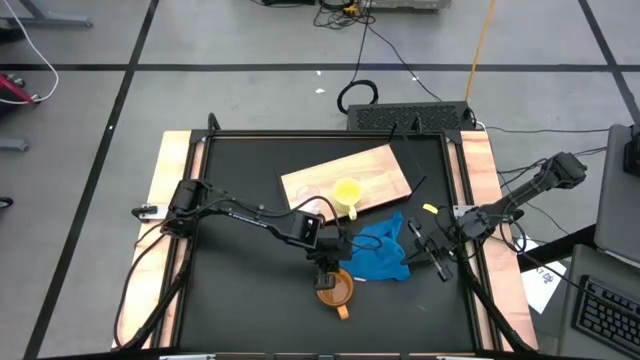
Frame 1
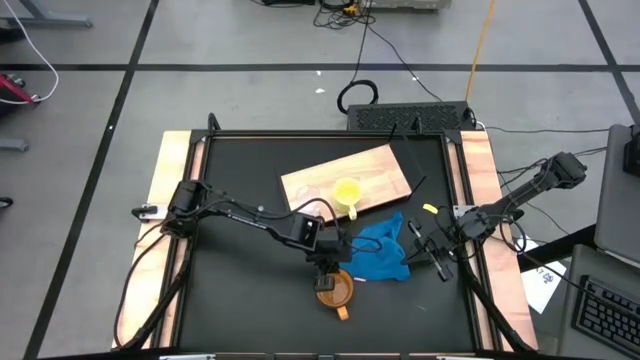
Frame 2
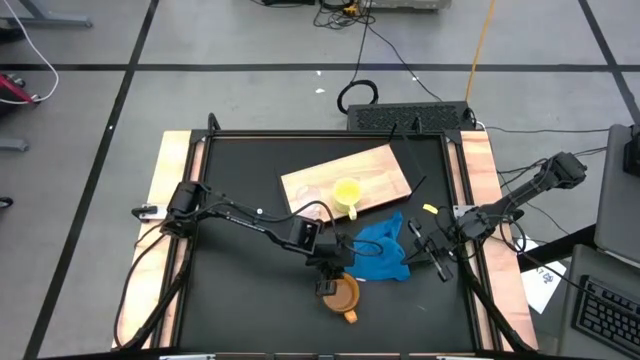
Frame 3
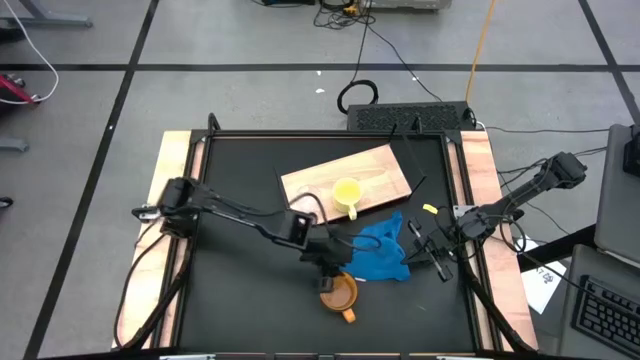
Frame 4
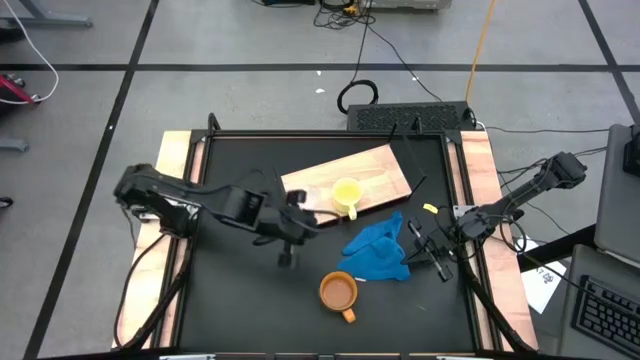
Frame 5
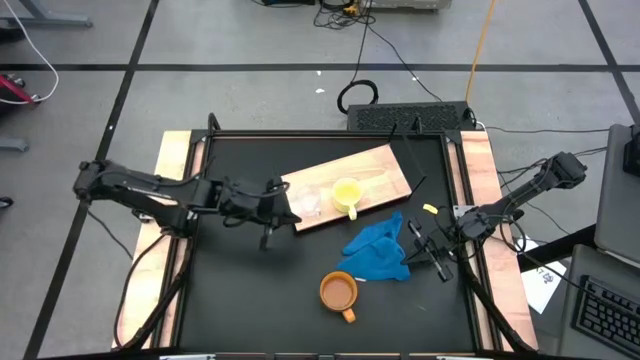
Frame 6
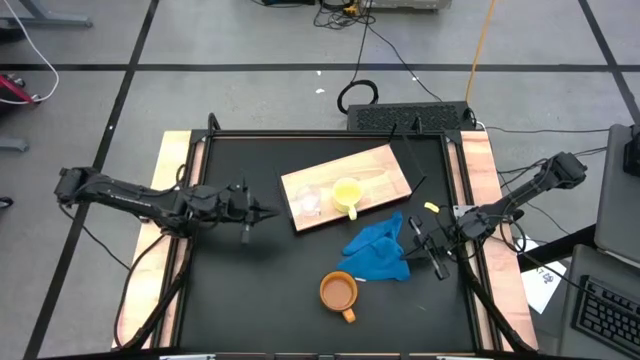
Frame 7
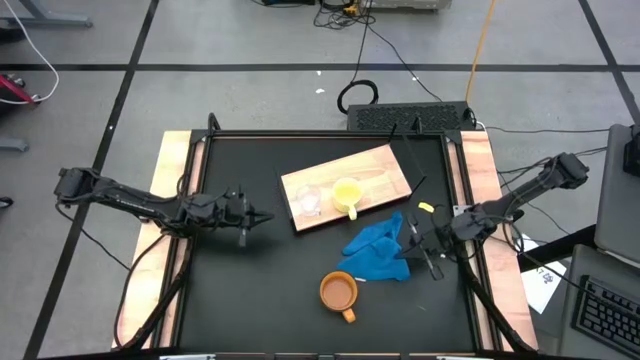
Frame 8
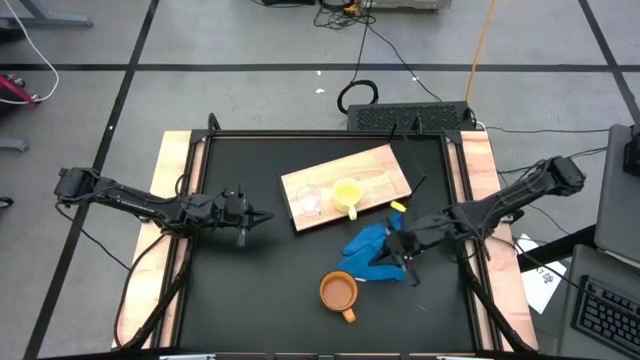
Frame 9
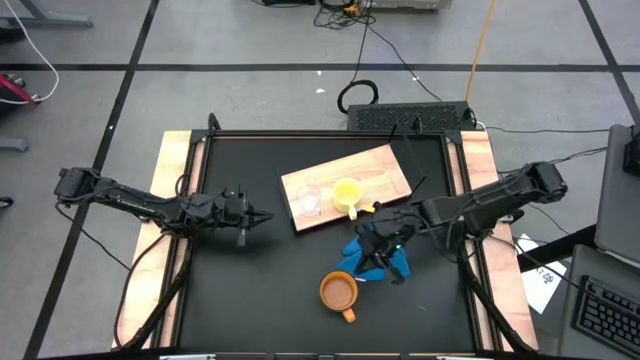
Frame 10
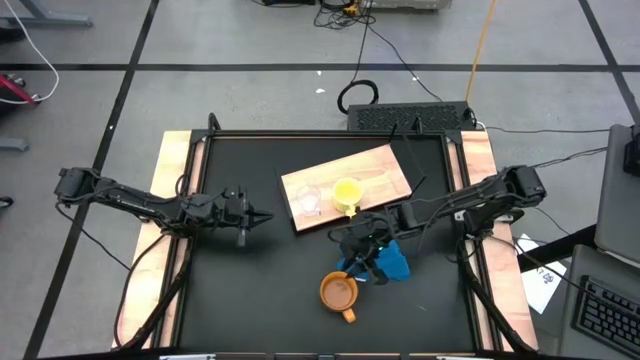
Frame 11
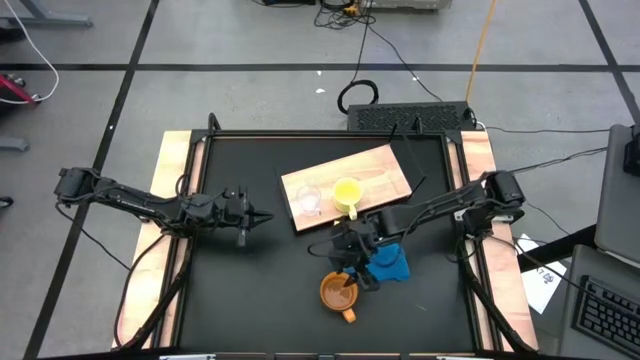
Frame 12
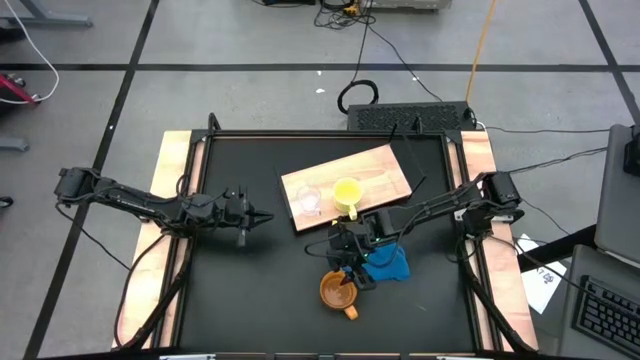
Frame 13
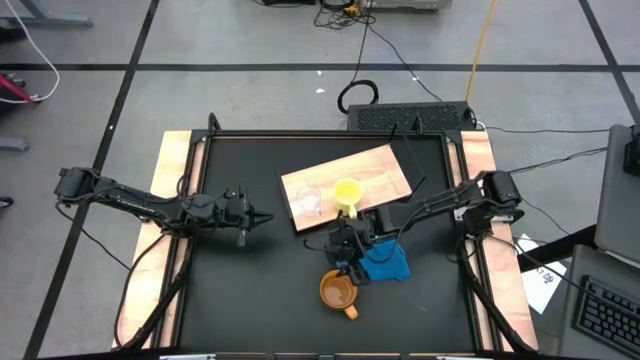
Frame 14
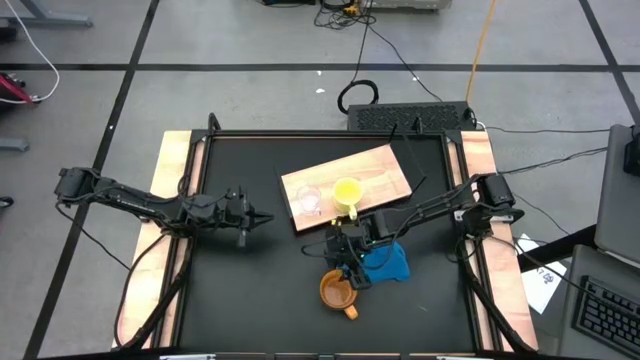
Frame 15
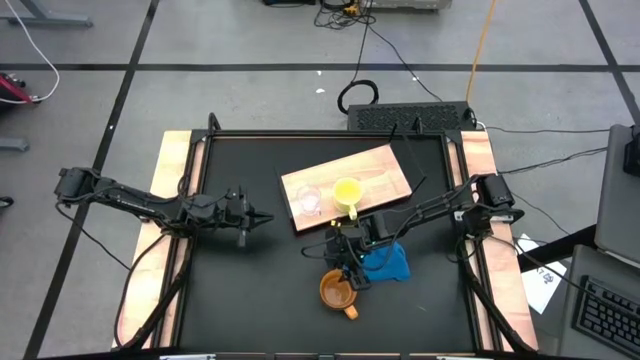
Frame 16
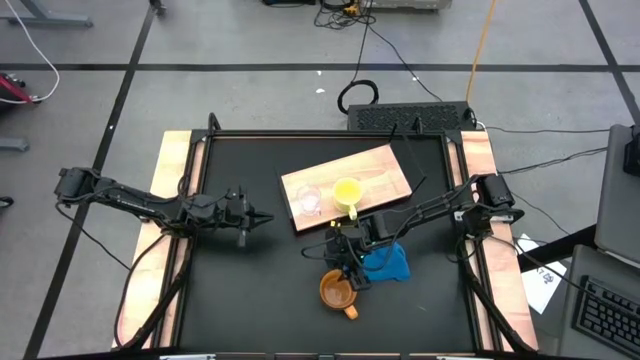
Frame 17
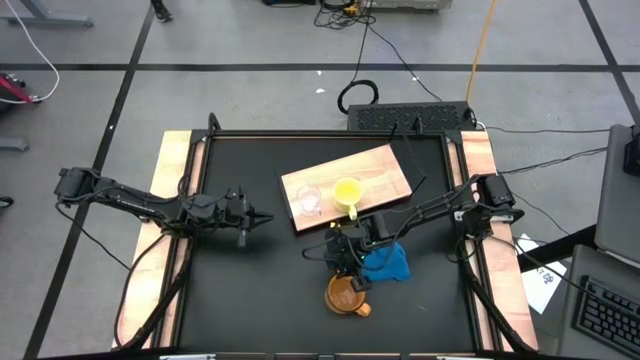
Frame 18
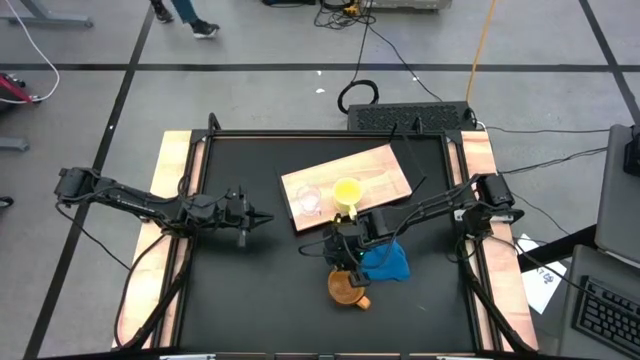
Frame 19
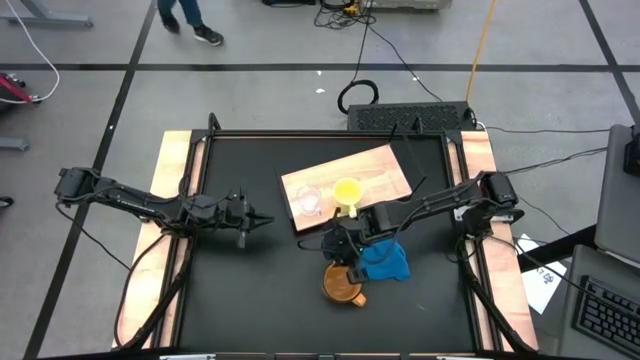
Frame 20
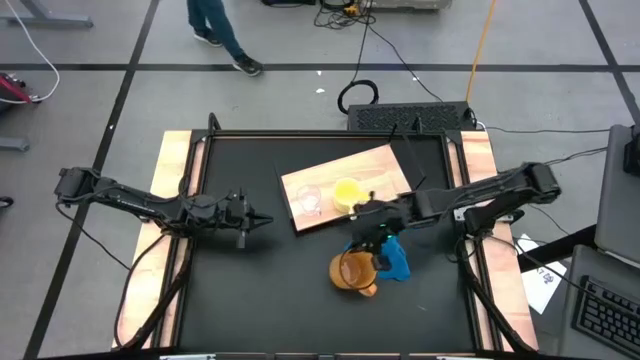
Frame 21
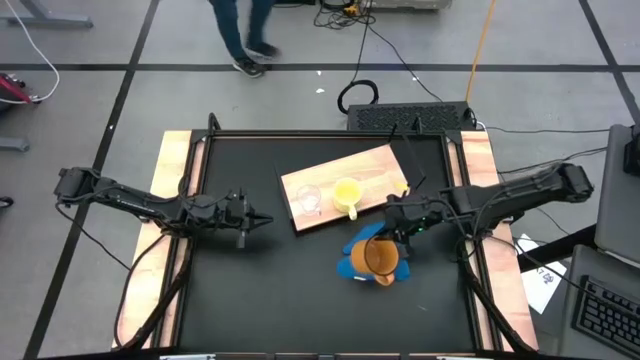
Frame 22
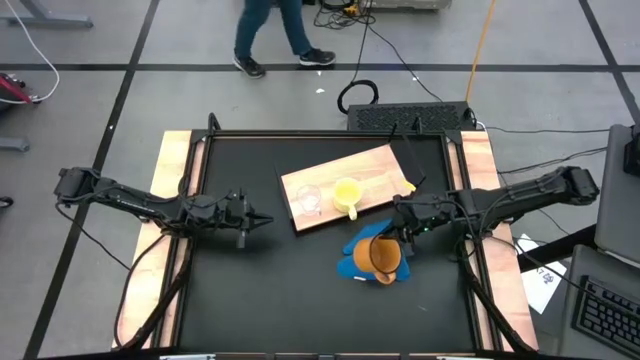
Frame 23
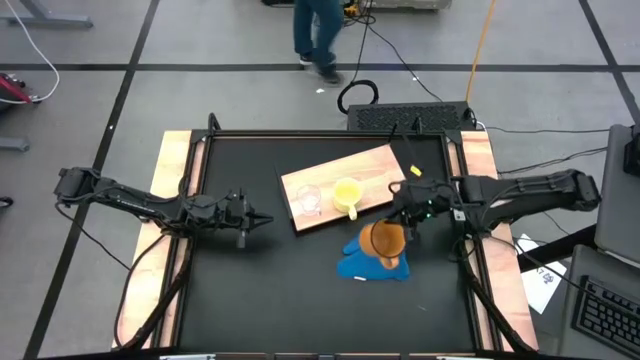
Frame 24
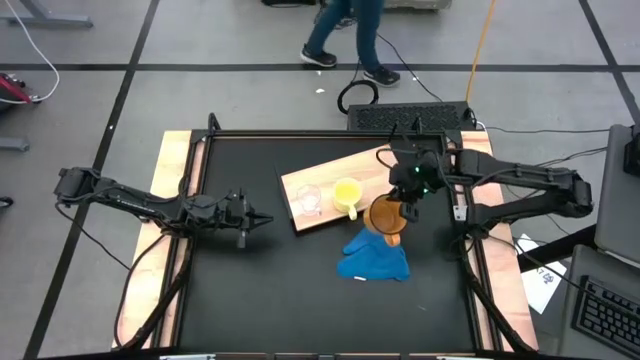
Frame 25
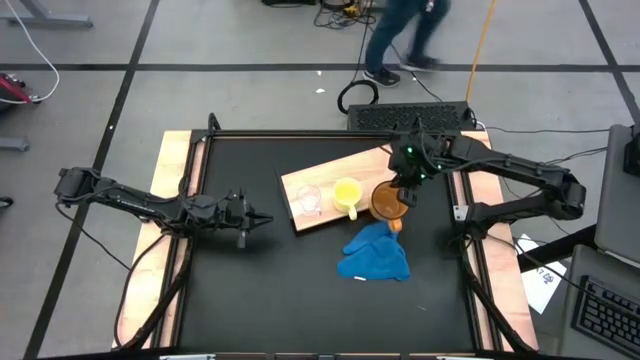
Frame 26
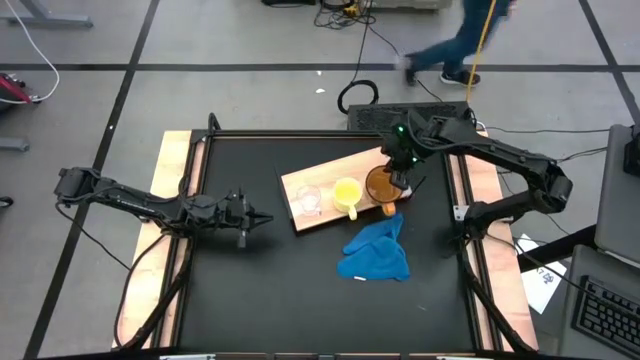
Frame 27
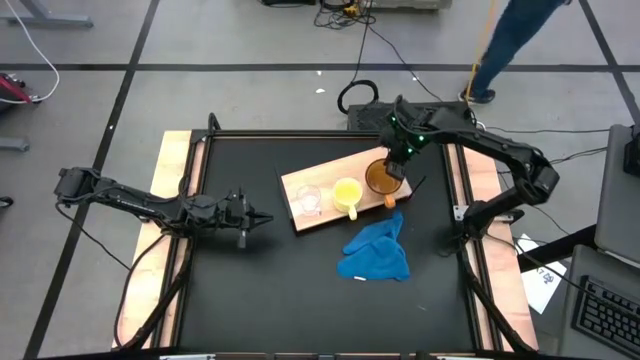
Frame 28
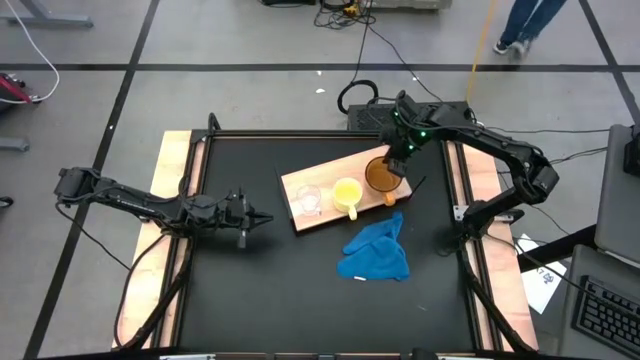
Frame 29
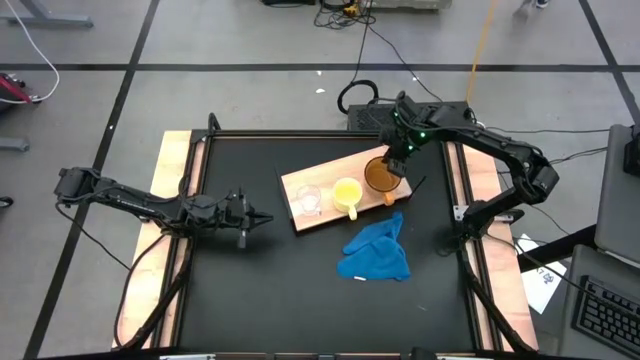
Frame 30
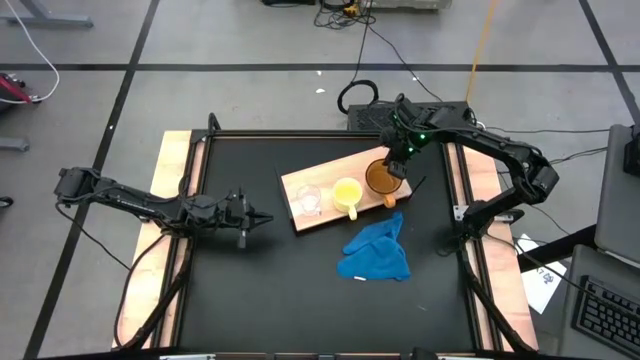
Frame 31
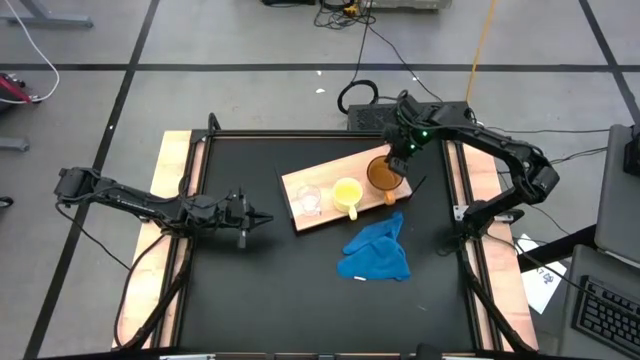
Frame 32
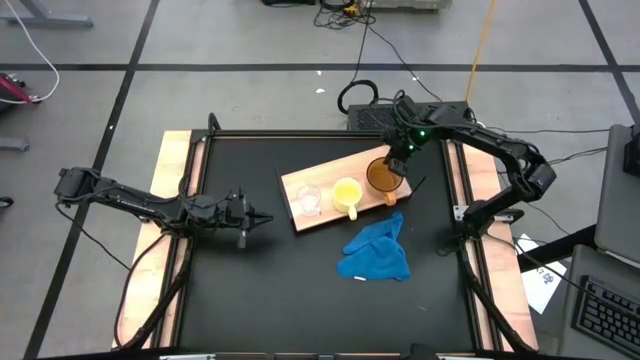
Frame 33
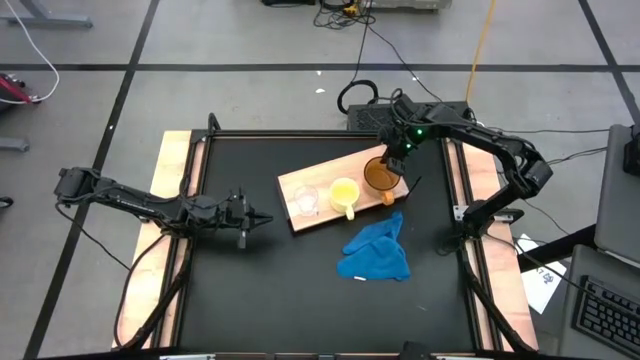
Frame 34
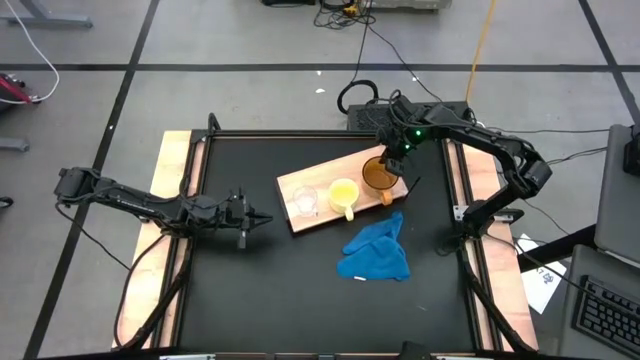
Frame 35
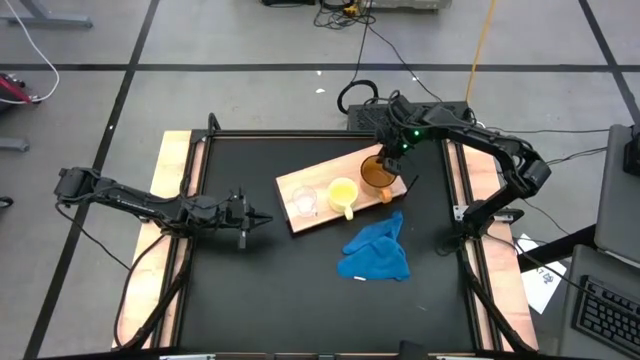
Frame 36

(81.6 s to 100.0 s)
Task: Stack small to large cups/mugs on shelf
Put the orange mug on the shelf
